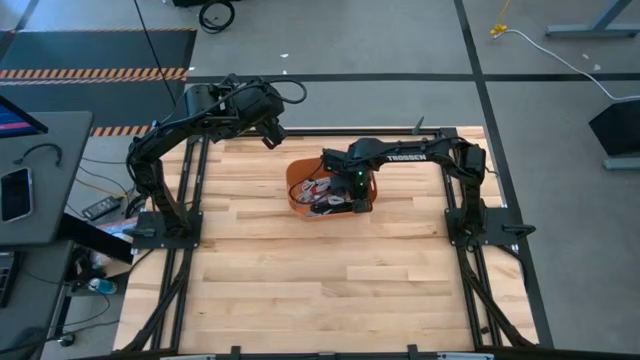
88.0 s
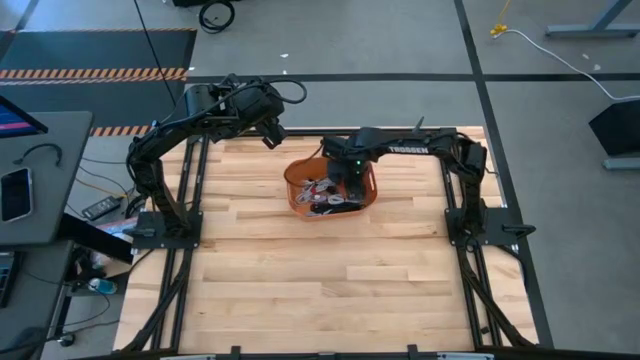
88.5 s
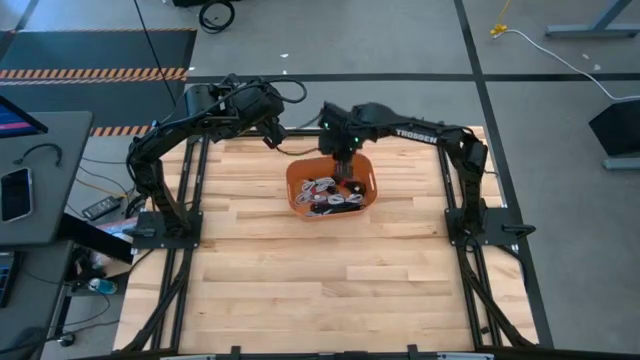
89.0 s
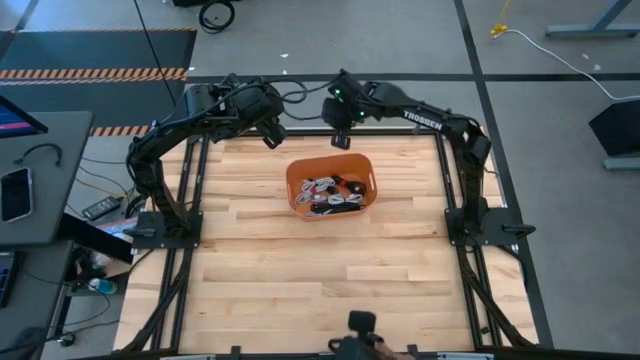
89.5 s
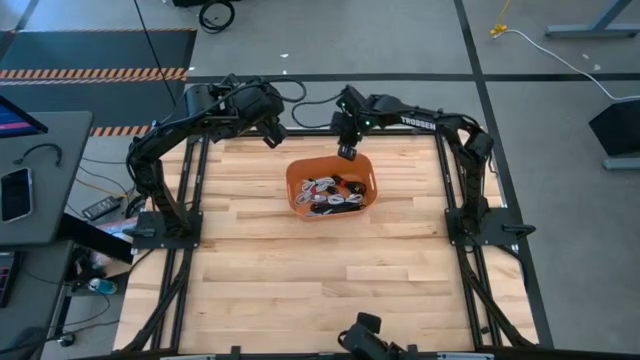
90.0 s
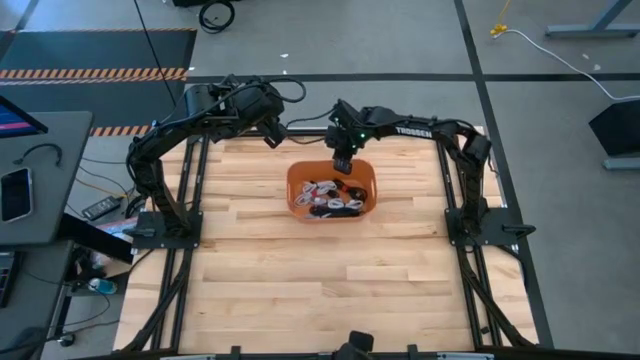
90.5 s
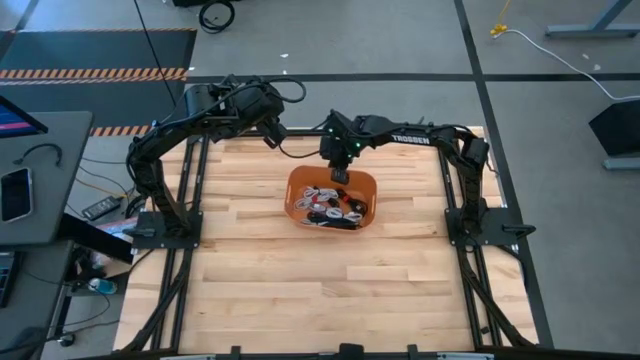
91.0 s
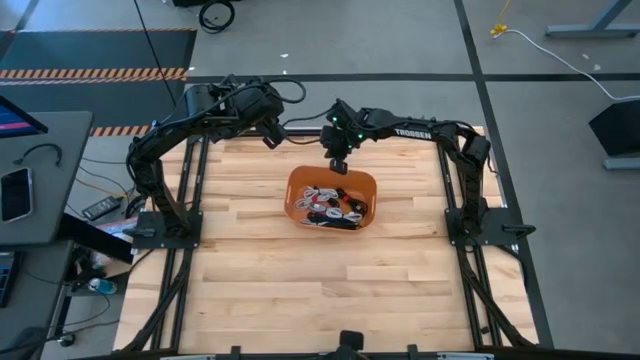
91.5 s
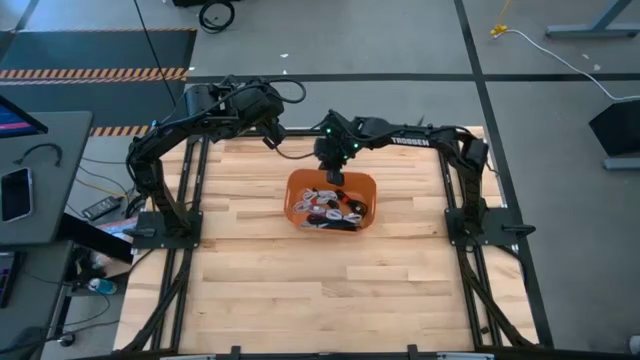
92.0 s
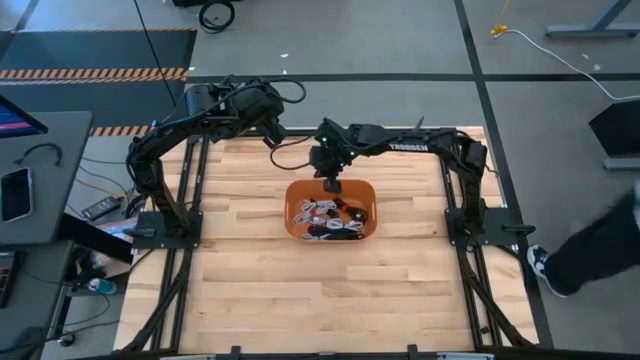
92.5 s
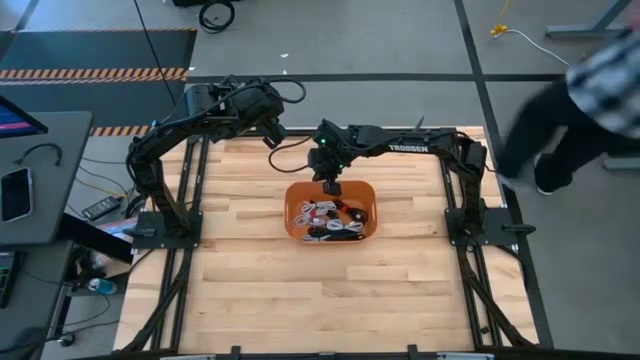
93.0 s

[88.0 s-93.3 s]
Task: Pick and place USB-C Cables
Move the orange bin to the center of the table

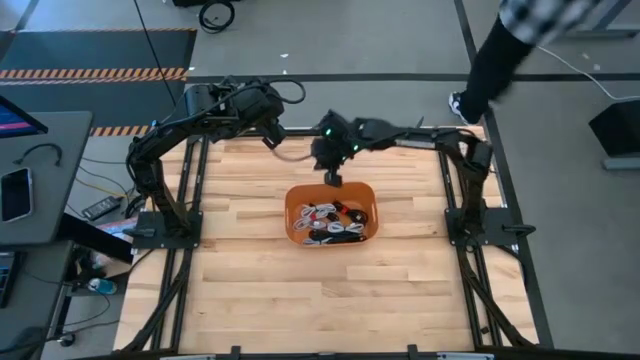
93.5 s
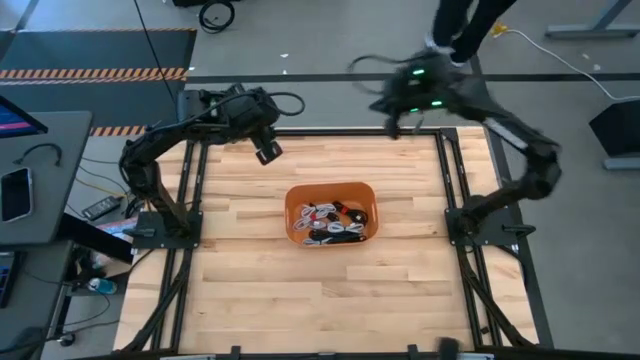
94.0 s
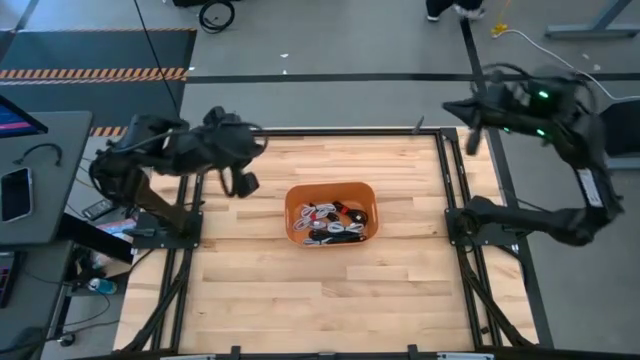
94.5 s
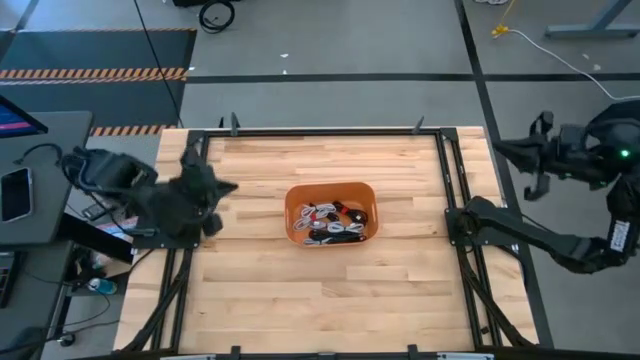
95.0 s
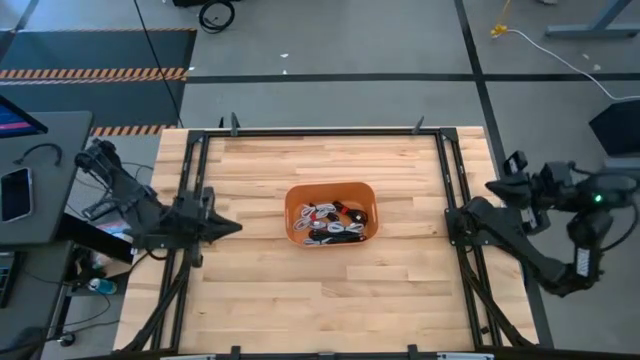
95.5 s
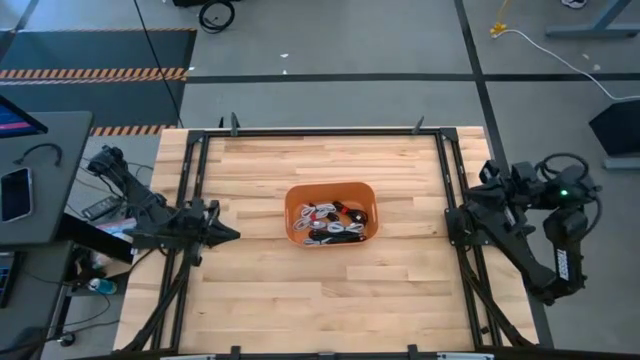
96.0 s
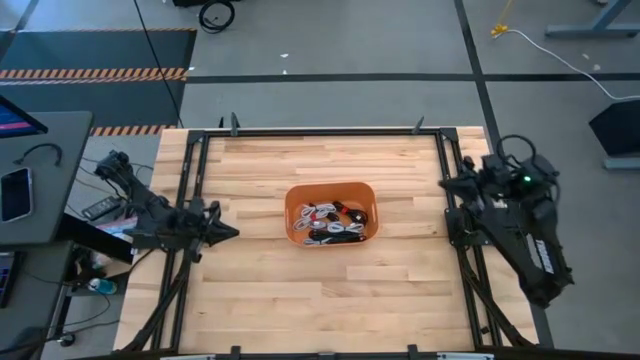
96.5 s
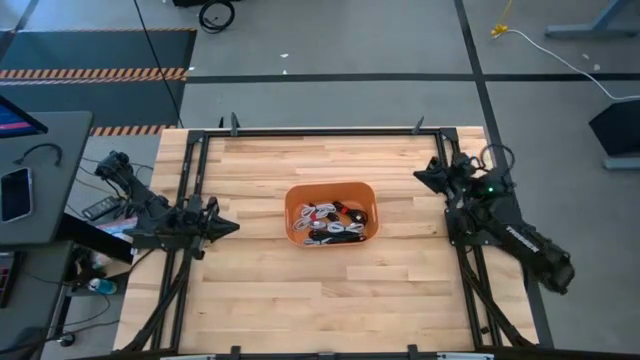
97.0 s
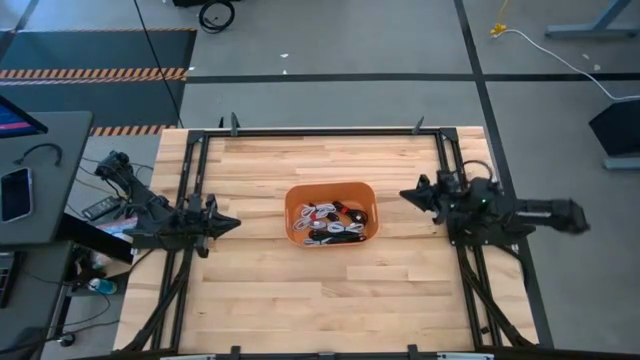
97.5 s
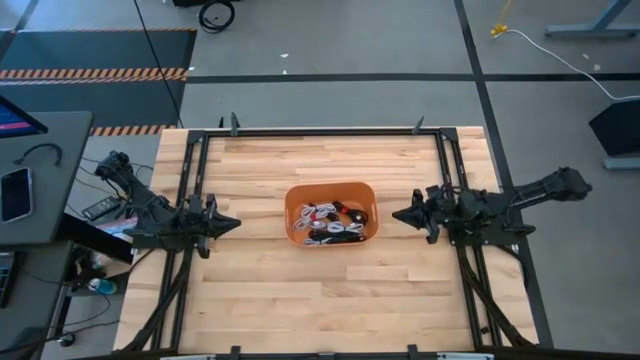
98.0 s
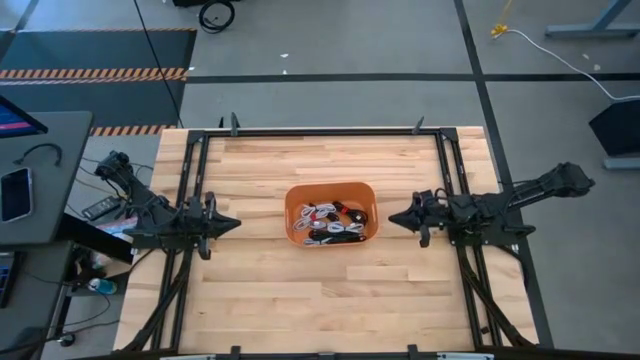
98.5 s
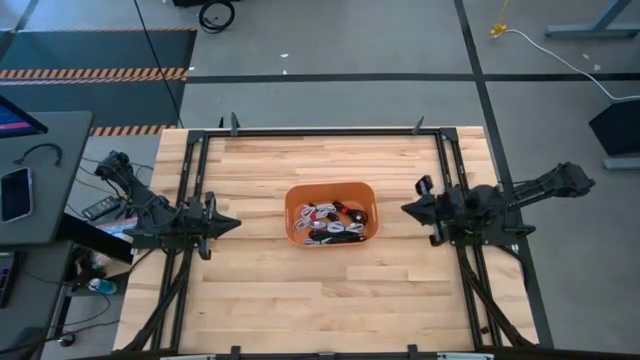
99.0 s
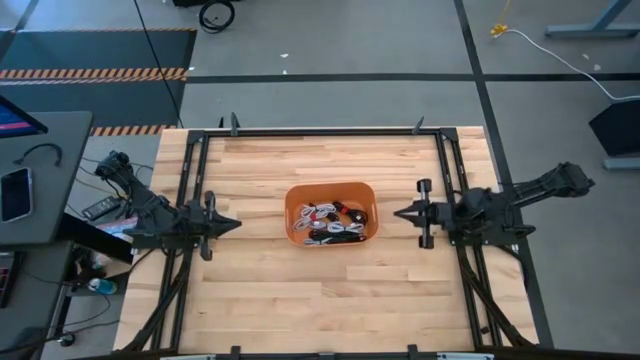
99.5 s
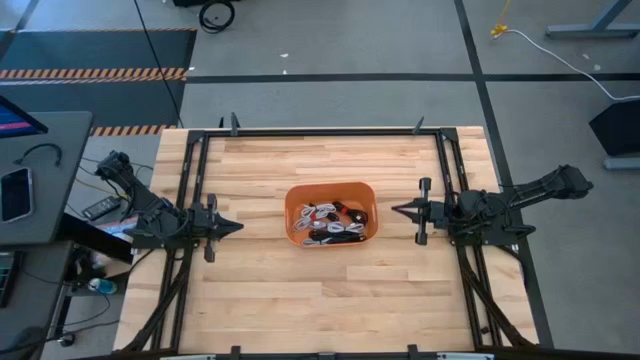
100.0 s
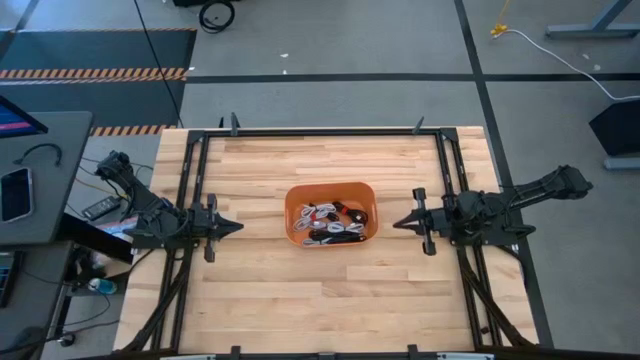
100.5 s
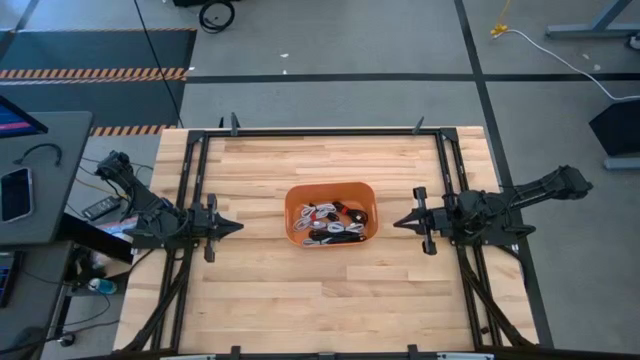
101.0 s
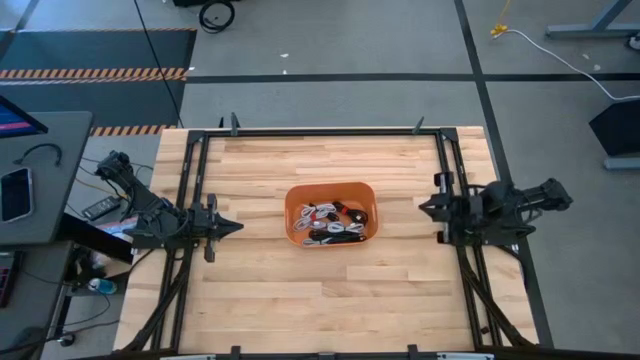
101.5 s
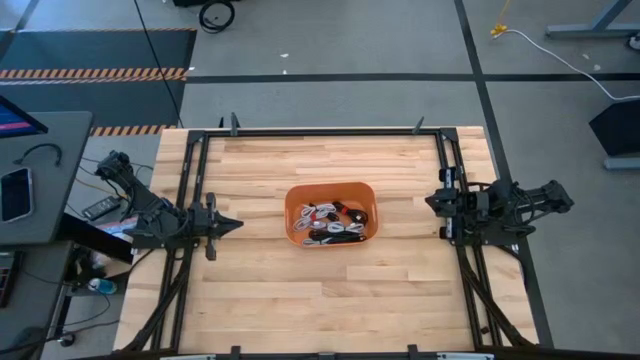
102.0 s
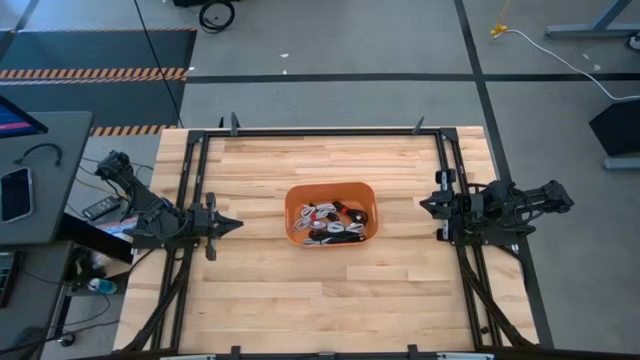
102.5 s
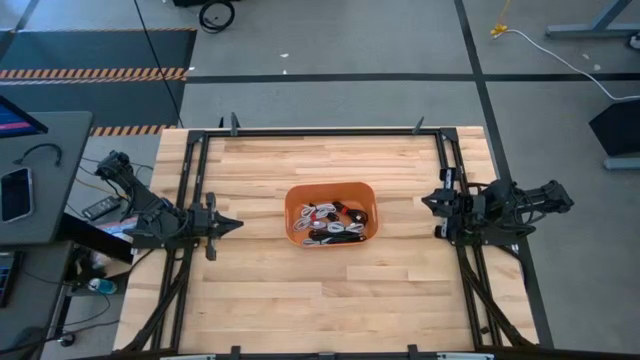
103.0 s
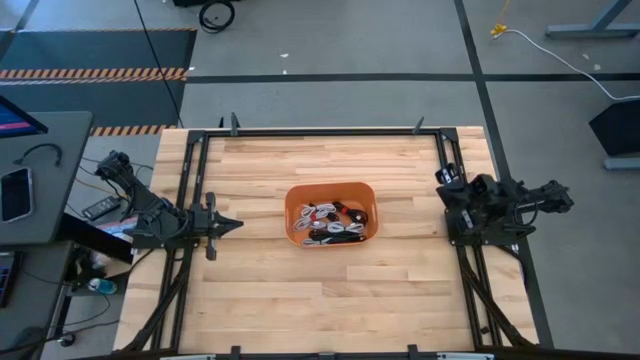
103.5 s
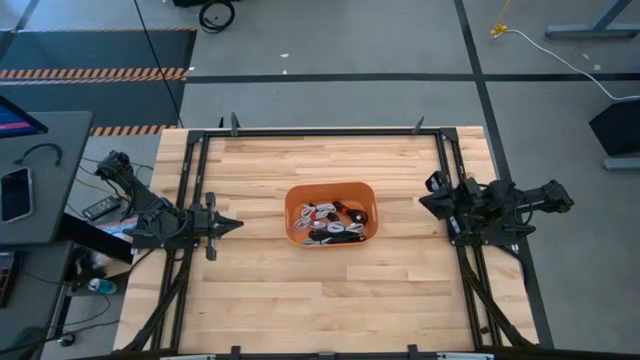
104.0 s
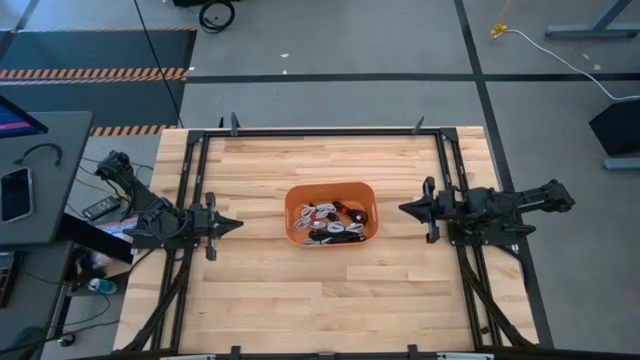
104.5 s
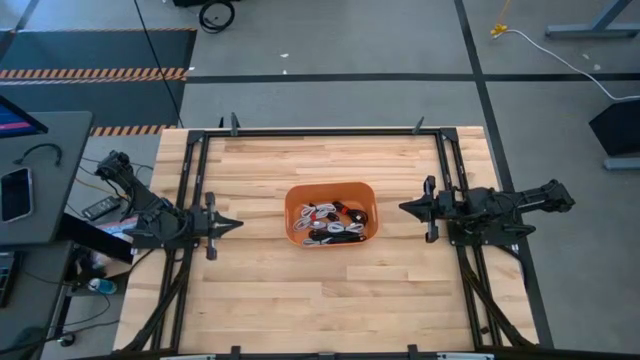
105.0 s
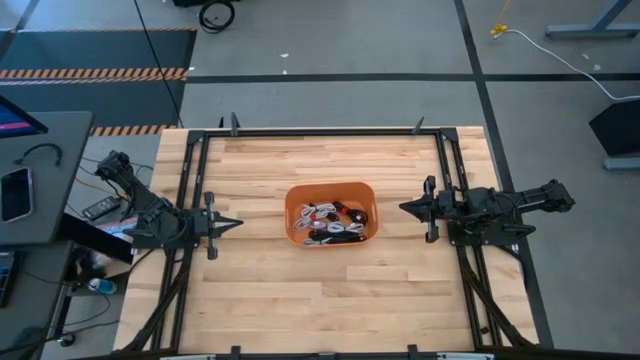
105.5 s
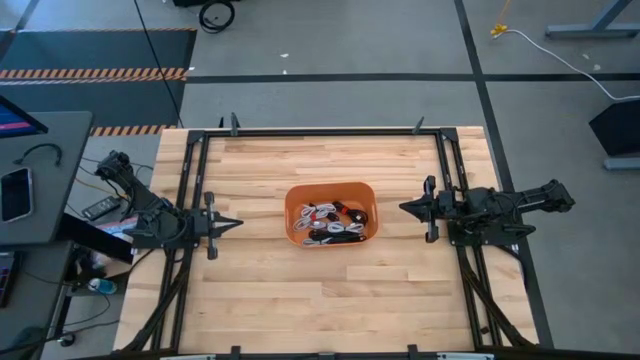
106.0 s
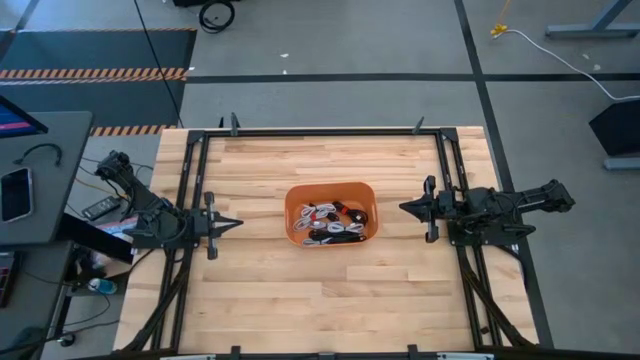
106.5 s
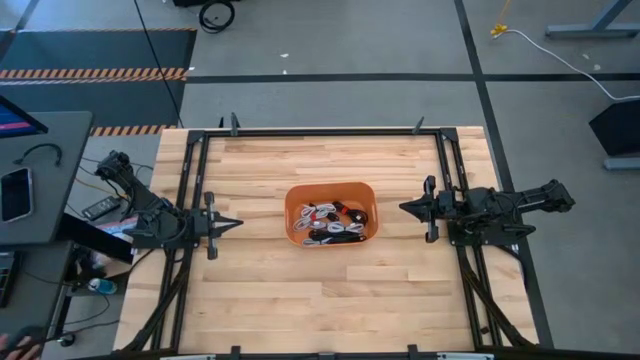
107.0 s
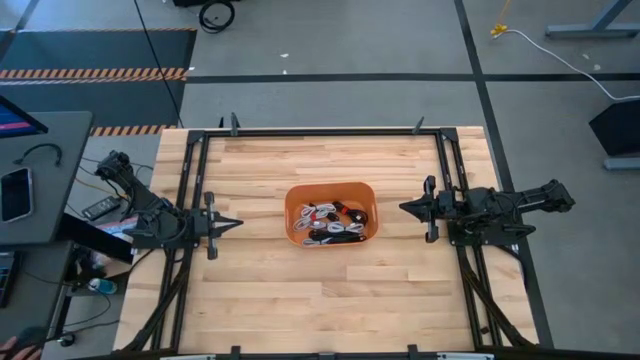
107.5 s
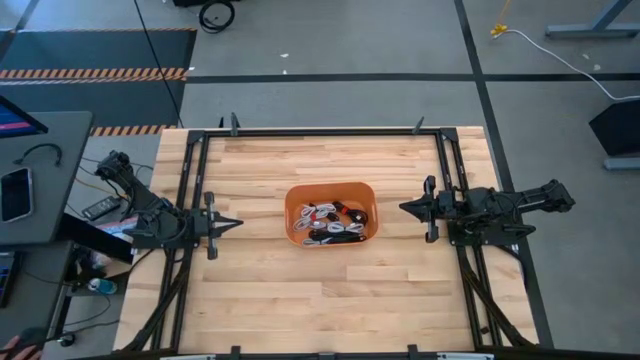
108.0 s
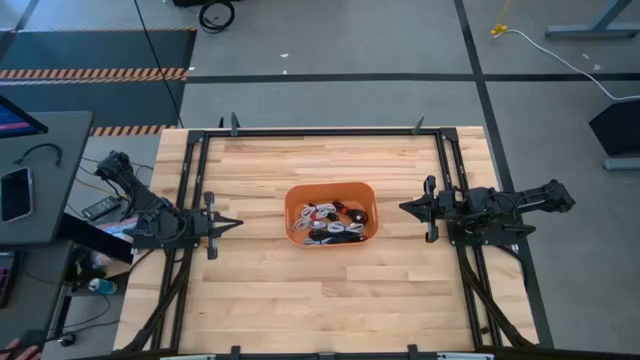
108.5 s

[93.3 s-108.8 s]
Return to Home Position
